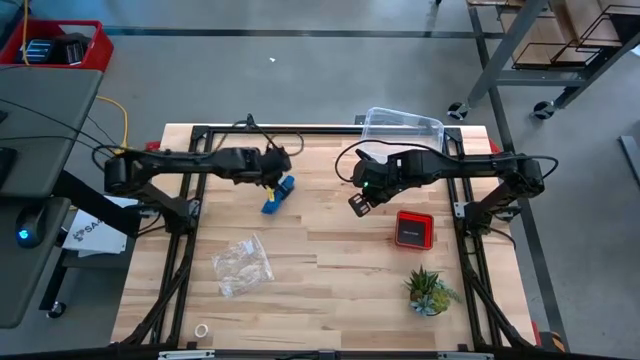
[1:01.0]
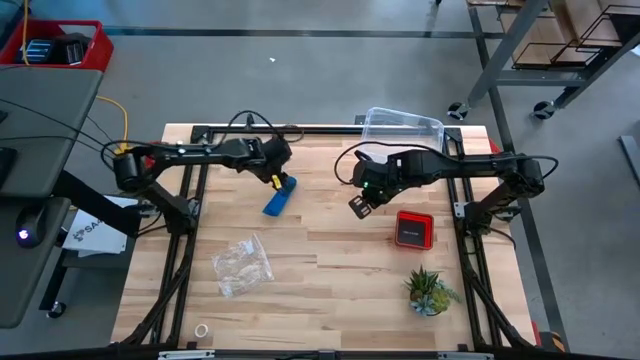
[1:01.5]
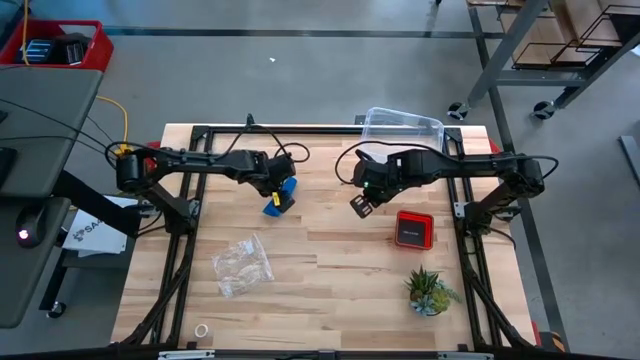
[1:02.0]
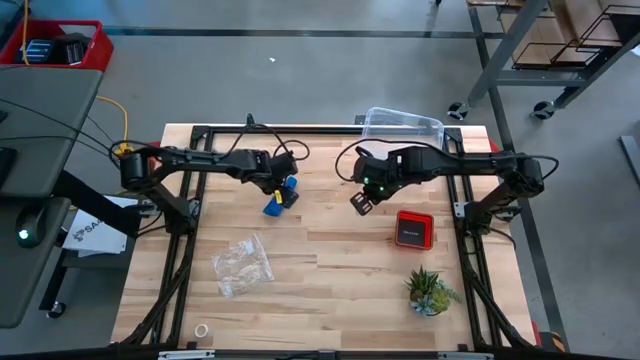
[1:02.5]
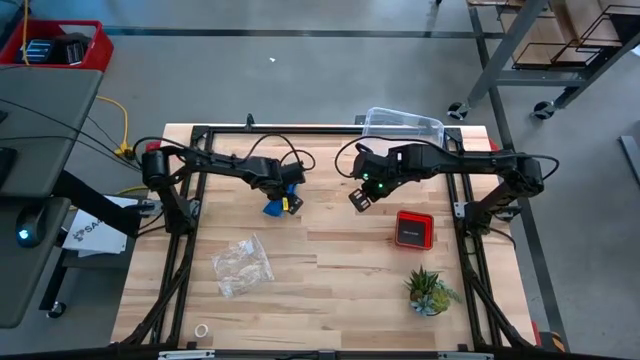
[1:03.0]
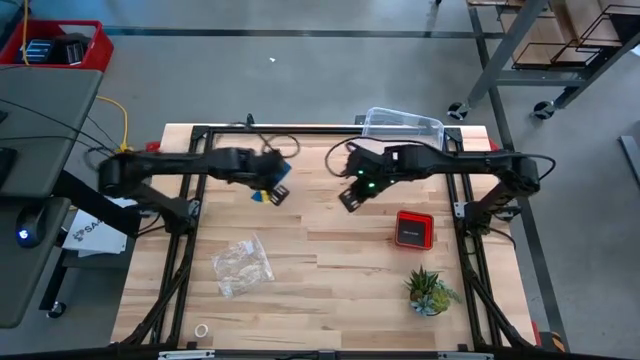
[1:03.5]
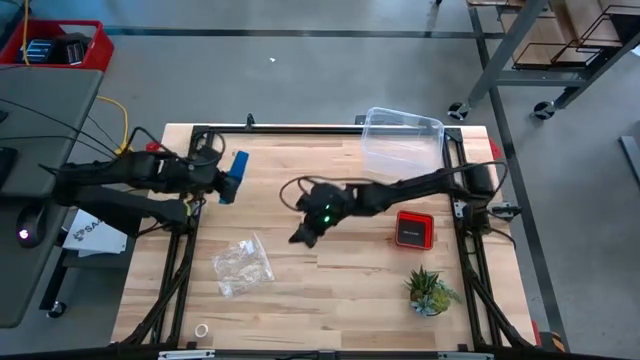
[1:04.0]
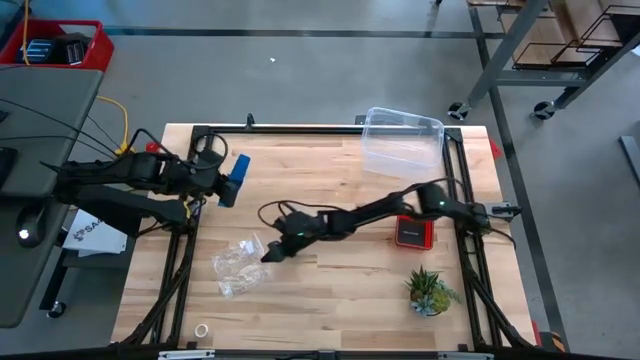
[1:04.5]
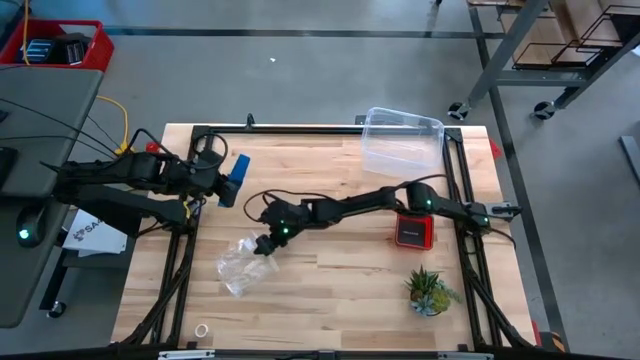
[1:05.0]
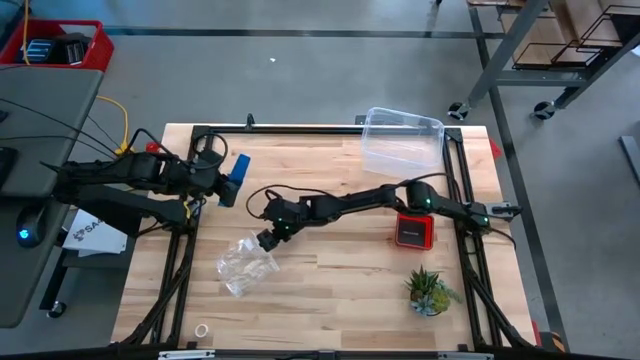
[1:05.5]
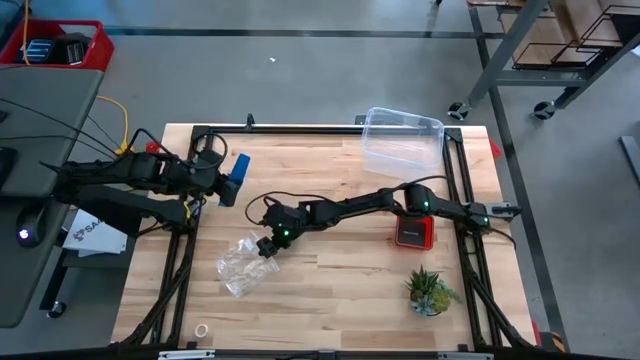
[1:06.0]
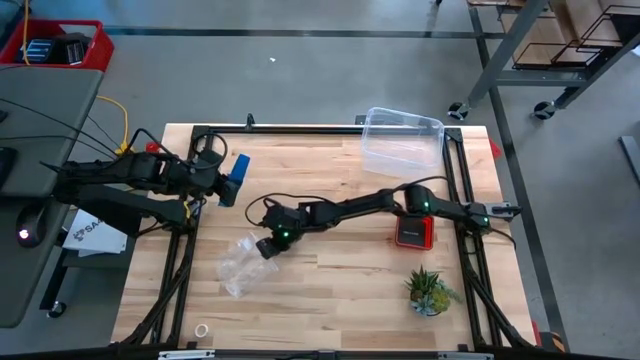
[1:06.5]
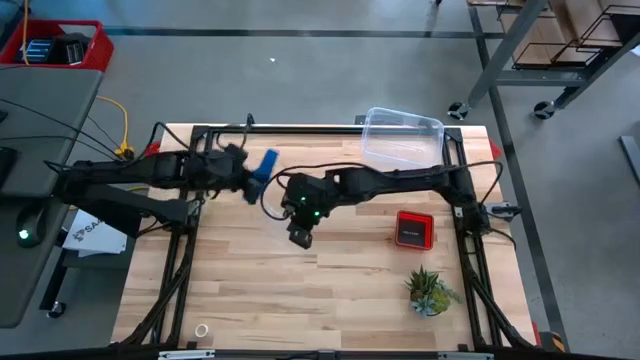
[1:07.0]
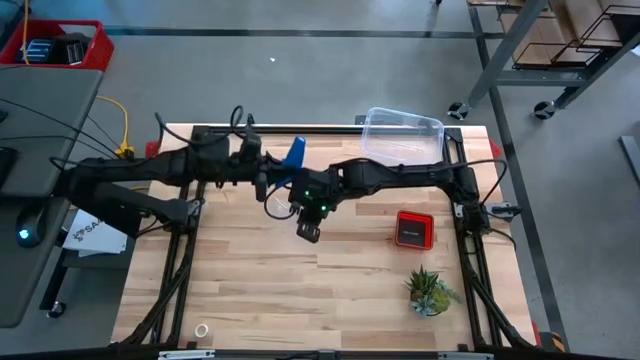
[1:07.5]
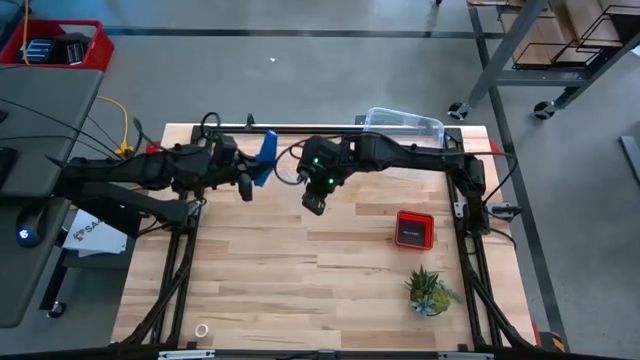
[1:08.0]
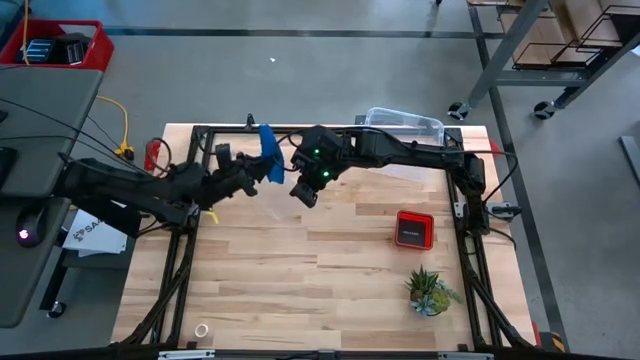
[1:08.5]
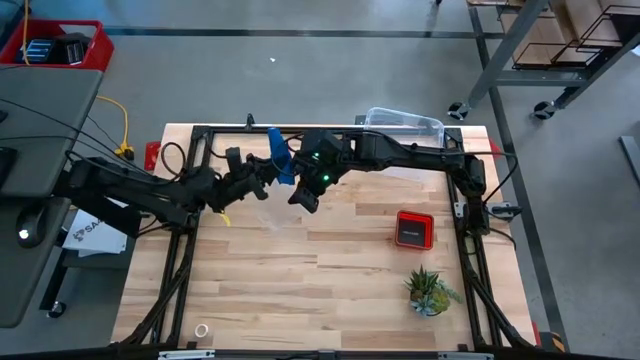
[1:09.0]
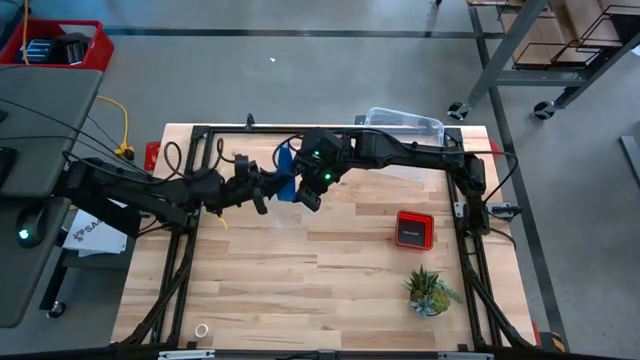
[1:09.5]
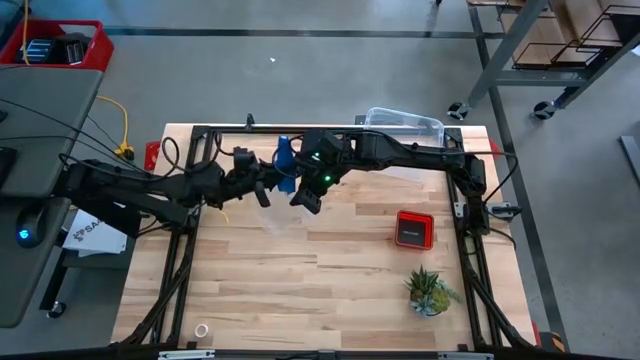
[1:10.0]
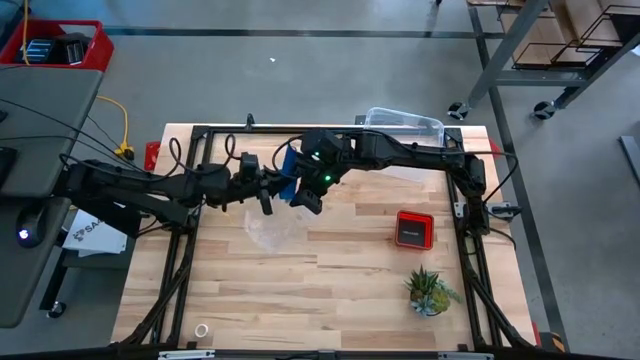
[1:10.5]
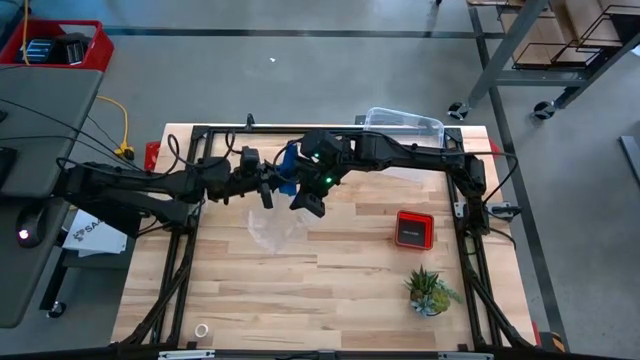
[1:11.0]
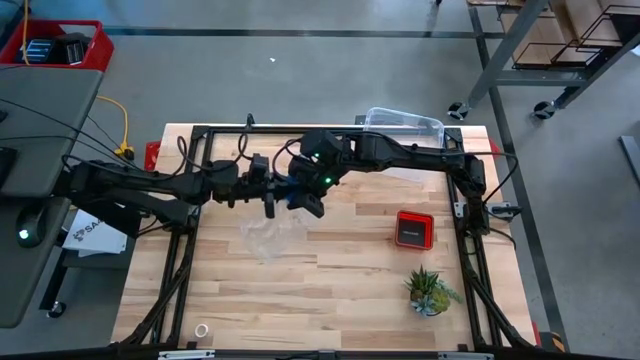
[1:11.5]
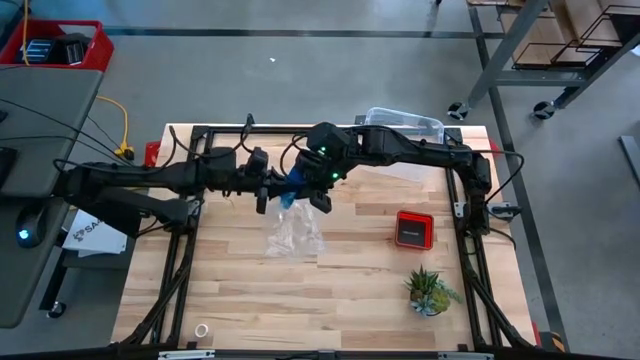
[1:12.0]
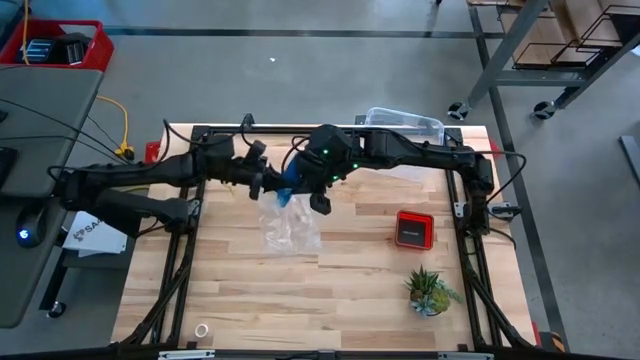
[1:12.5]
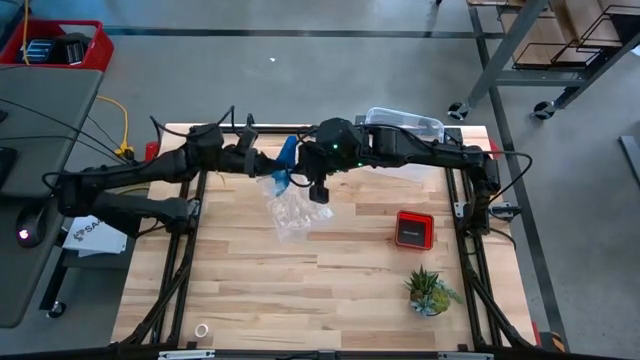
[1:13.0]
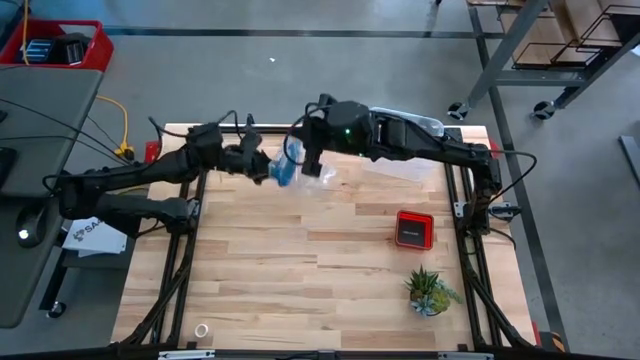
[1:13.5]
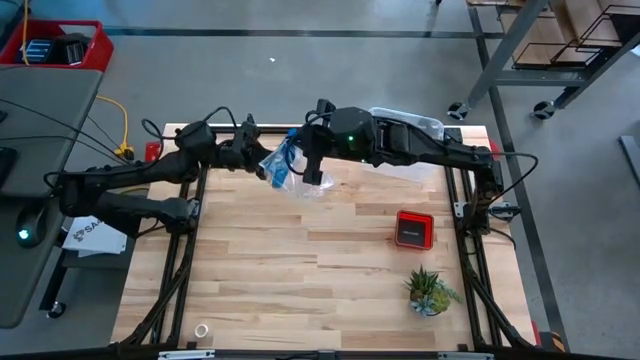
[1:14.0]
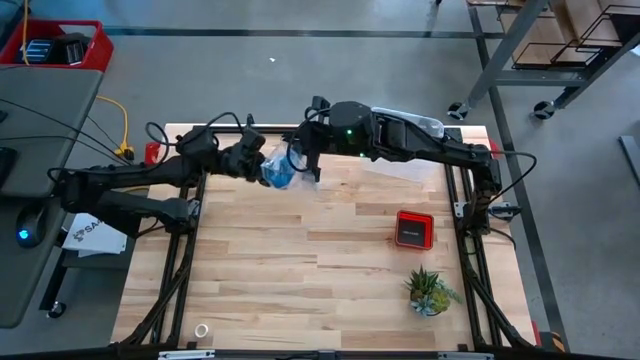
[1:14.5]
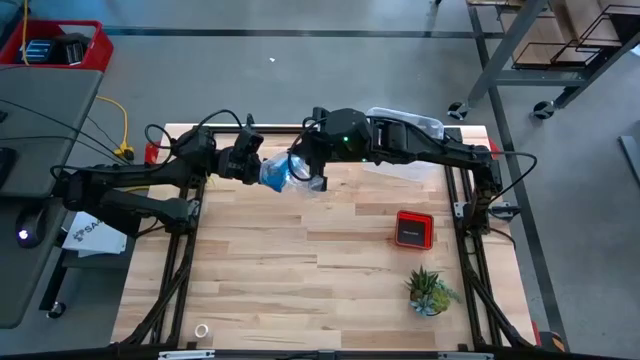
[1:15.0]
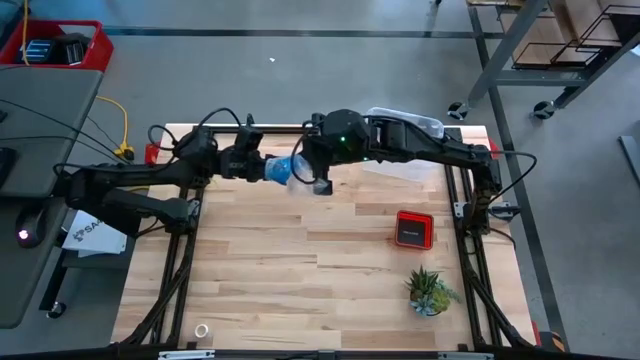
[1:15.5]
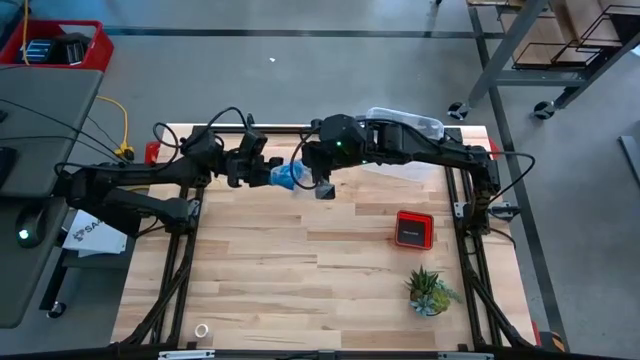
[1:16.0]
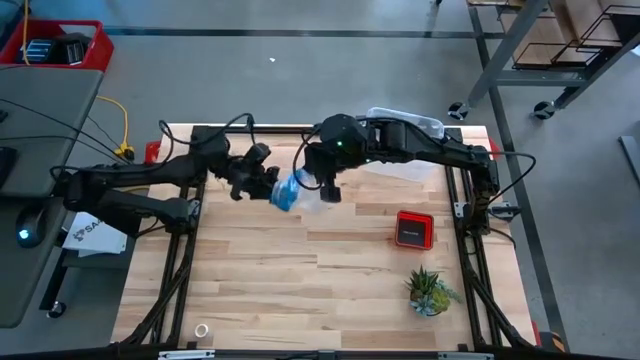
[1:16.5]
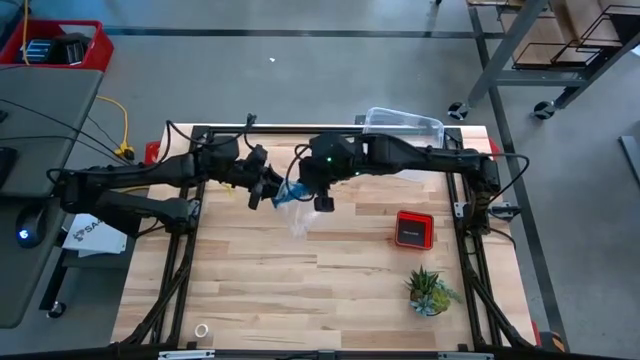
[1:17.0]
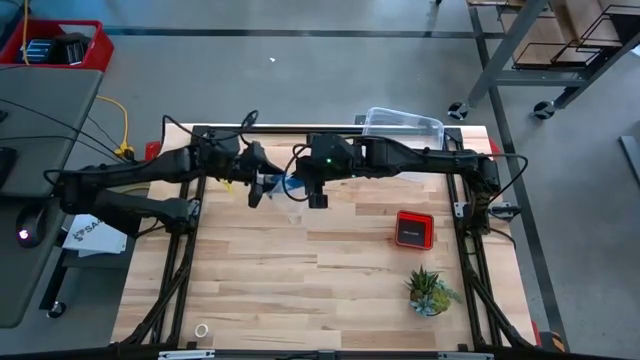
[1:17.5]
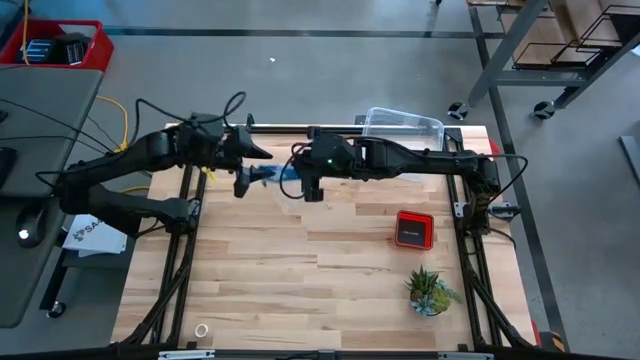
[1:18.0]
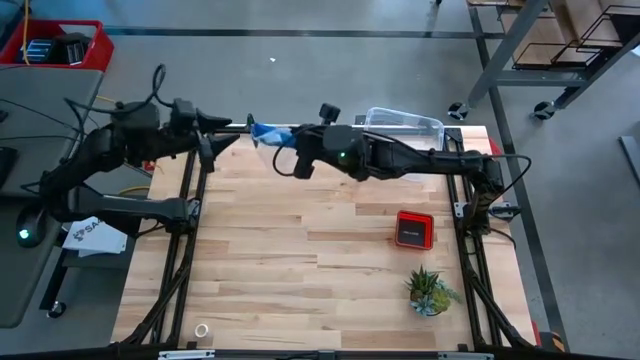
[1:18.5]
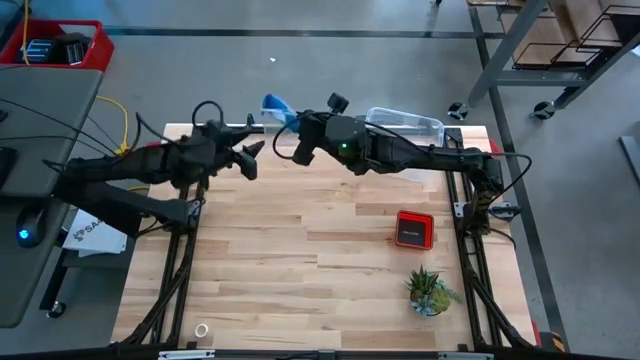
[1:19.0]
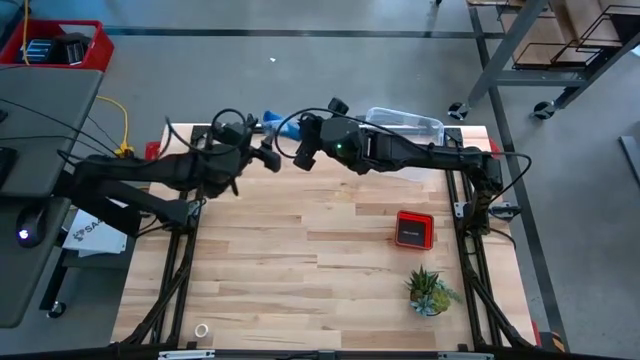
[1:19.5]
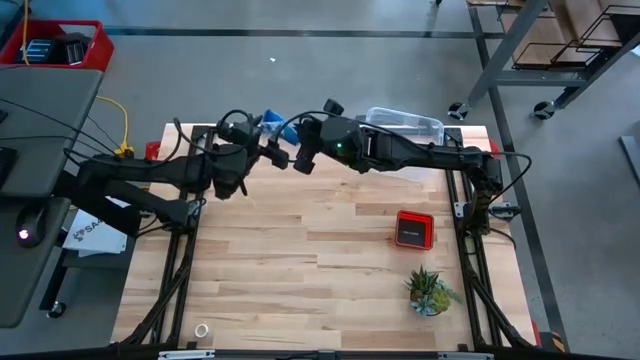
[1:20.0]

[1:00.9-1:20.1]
Task: Roll bandage
Put the rolled blue bandage into the transparent zip bag

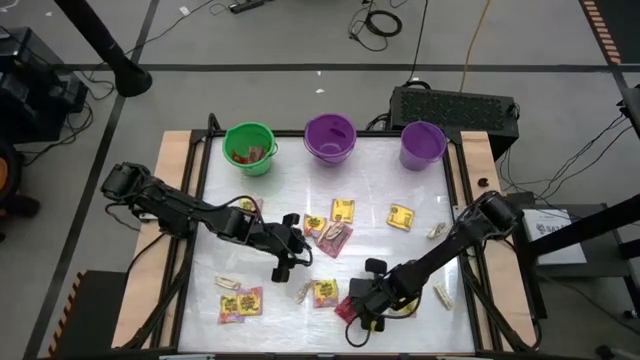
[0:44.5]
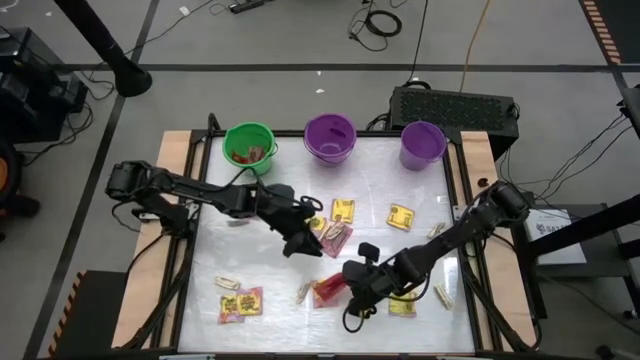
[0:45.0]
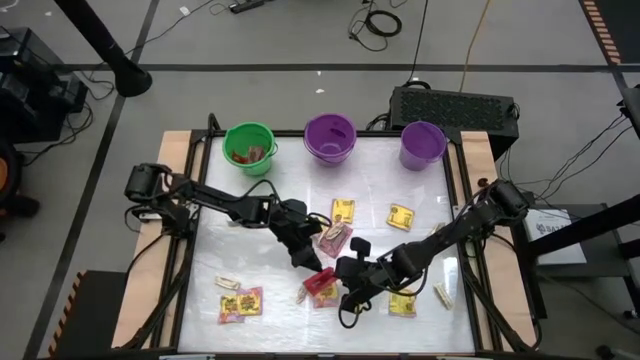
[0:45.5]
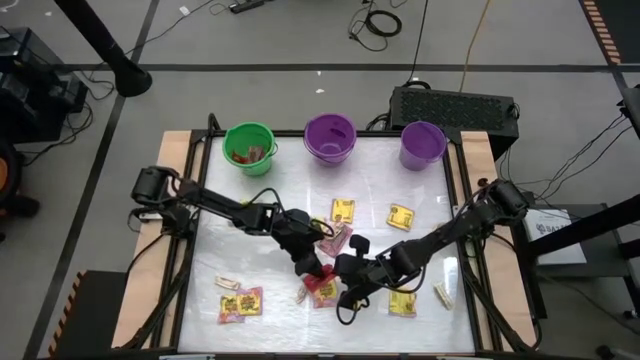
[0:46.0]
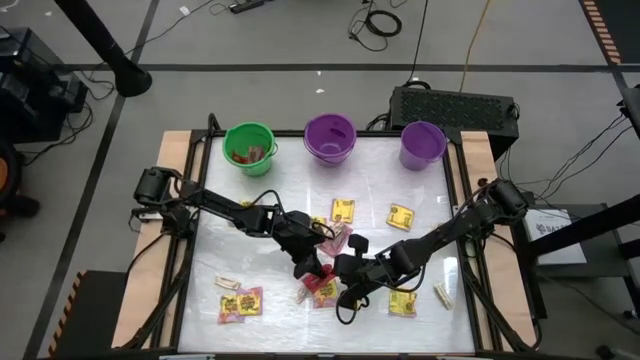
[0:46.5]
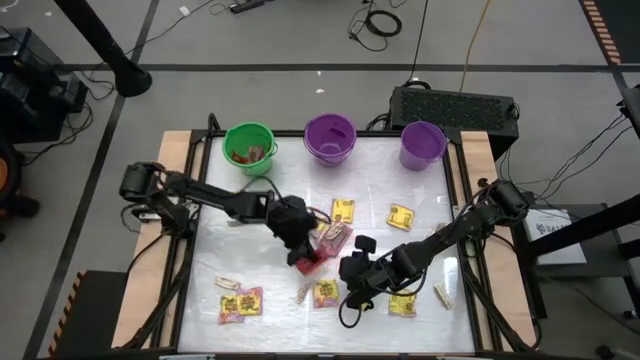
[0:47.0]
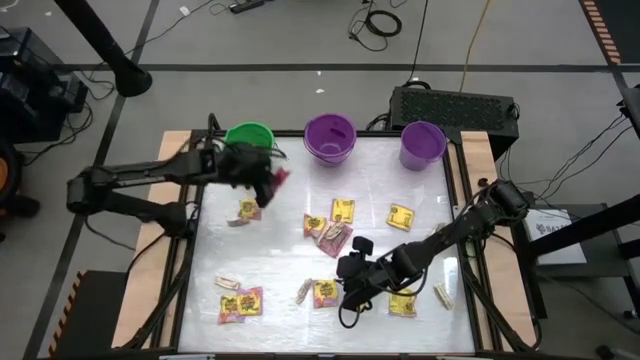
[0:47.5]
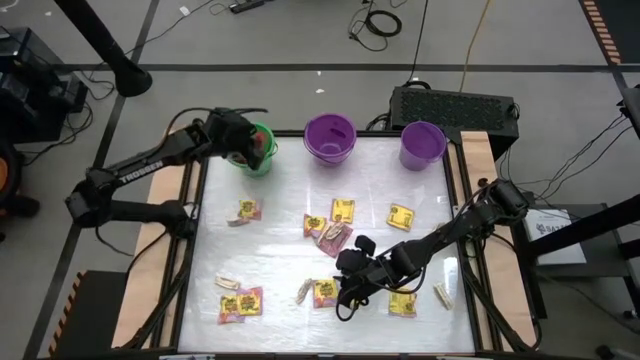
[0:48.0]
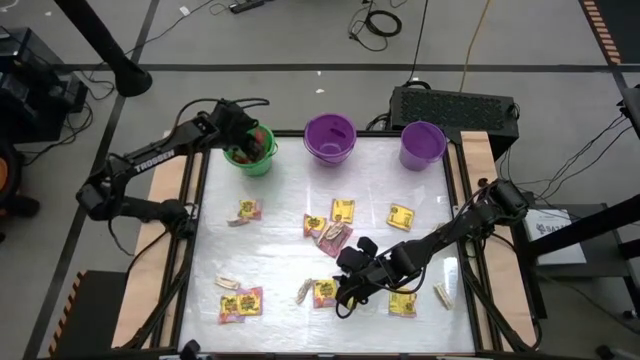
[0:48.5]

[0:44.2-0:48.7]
Task: Sort candy by brand, put in halloween buckets
Put the red candy pack in the green bucket
